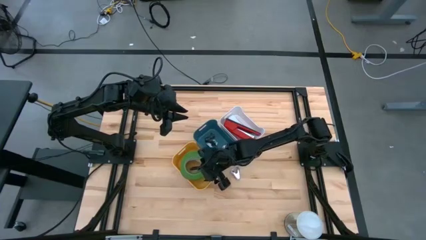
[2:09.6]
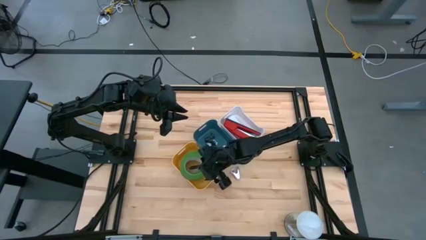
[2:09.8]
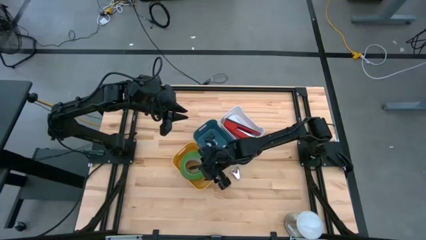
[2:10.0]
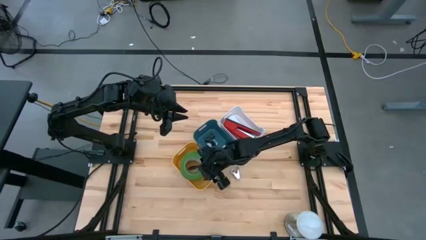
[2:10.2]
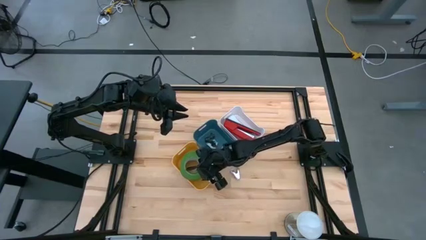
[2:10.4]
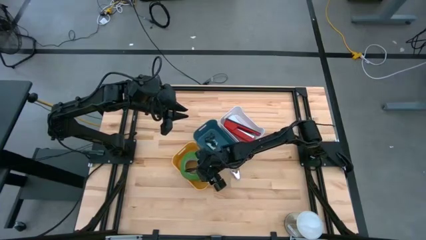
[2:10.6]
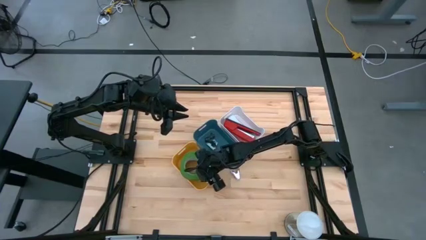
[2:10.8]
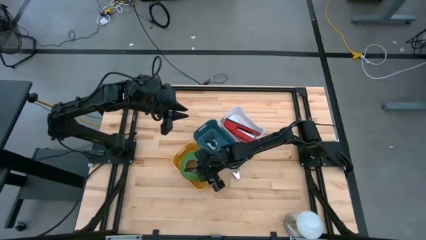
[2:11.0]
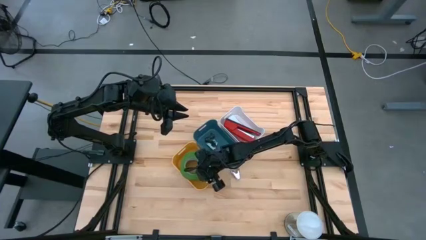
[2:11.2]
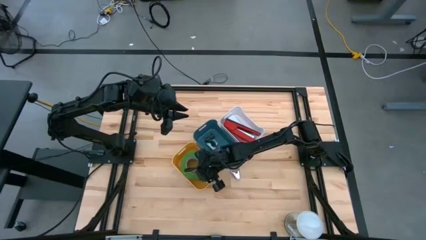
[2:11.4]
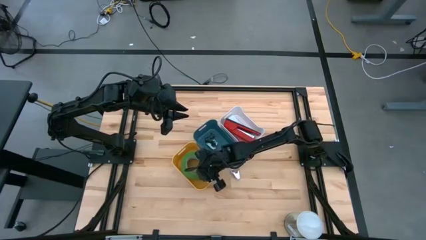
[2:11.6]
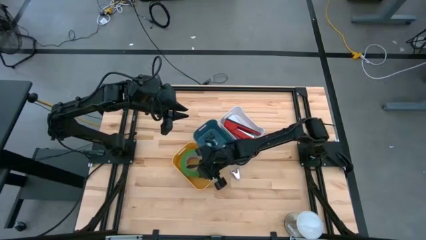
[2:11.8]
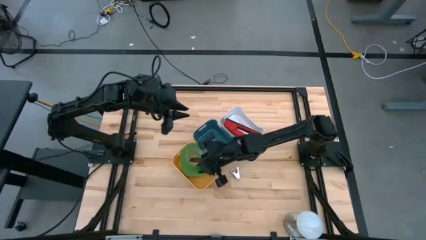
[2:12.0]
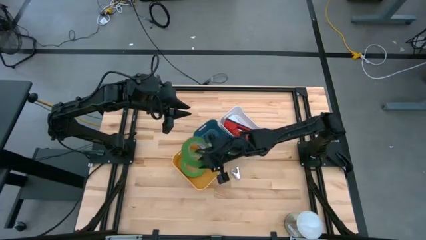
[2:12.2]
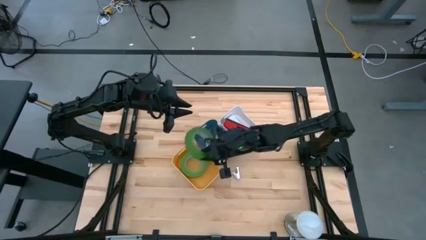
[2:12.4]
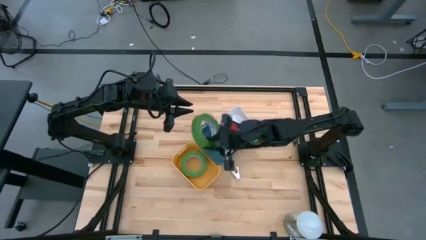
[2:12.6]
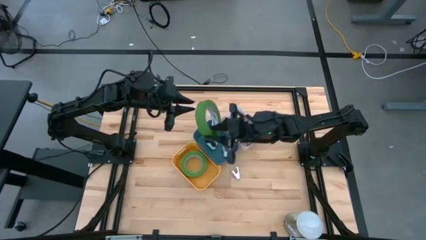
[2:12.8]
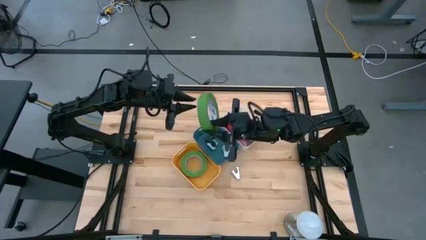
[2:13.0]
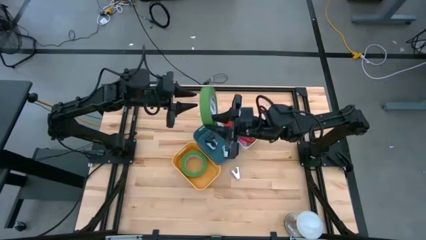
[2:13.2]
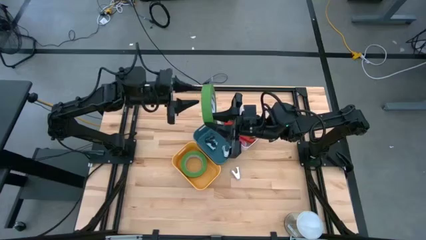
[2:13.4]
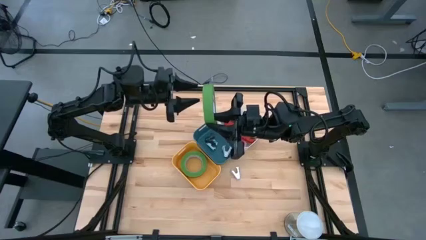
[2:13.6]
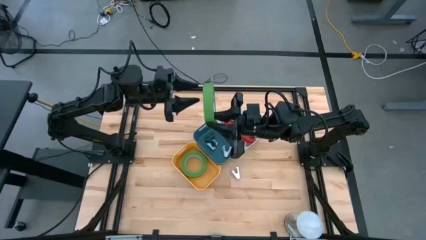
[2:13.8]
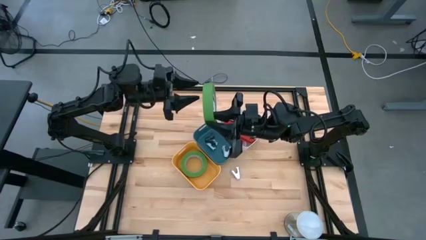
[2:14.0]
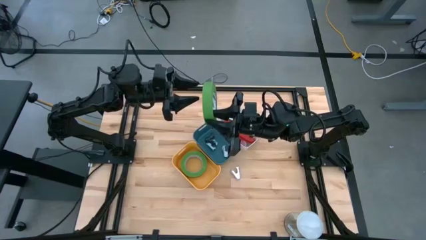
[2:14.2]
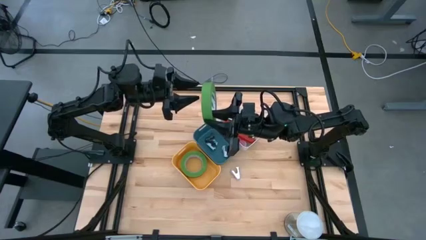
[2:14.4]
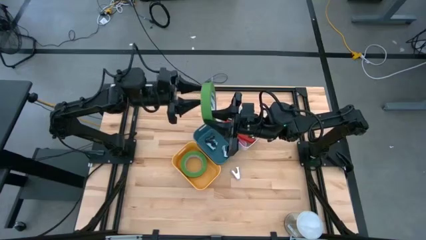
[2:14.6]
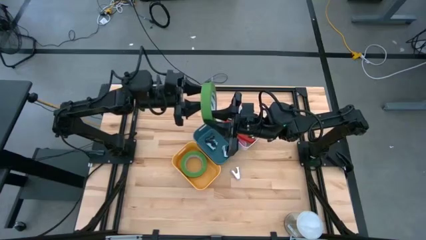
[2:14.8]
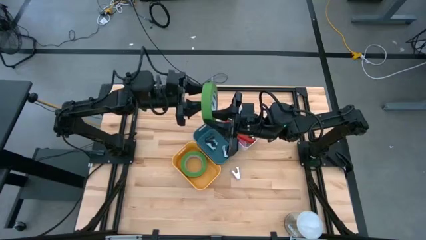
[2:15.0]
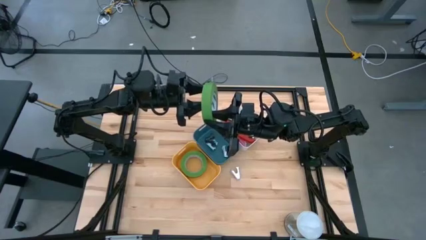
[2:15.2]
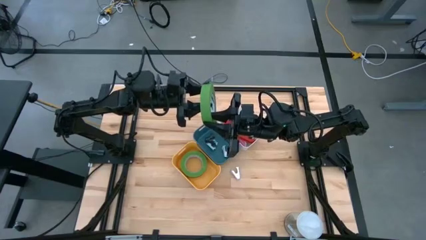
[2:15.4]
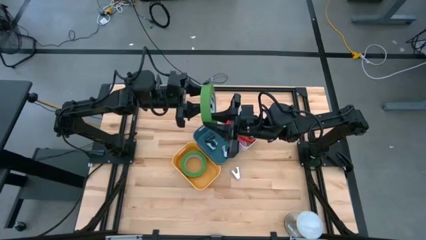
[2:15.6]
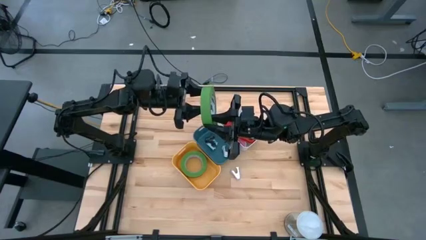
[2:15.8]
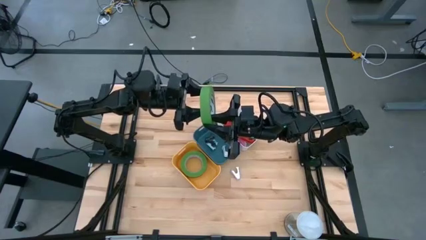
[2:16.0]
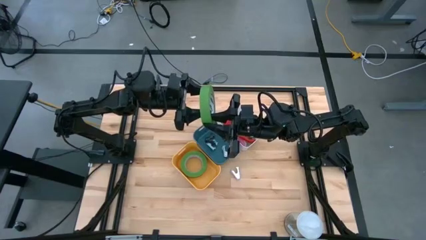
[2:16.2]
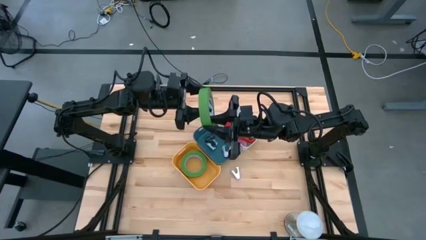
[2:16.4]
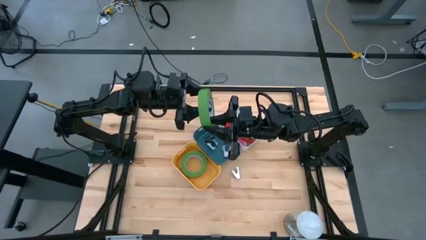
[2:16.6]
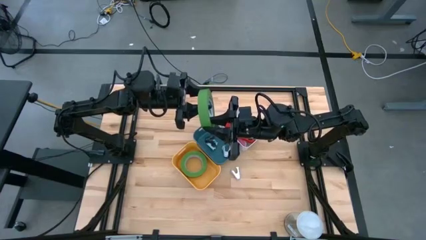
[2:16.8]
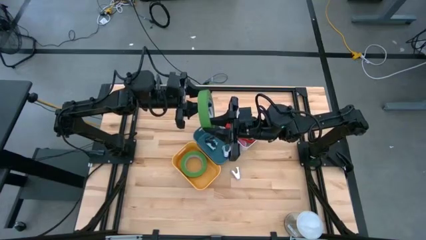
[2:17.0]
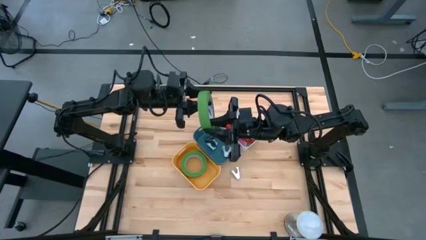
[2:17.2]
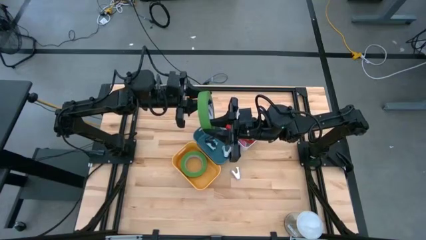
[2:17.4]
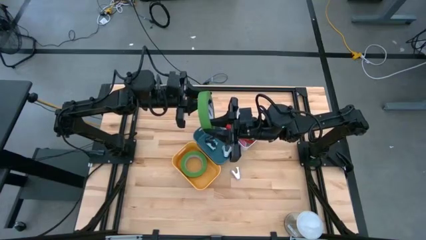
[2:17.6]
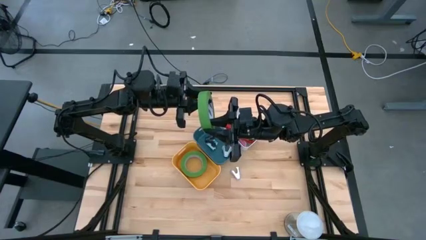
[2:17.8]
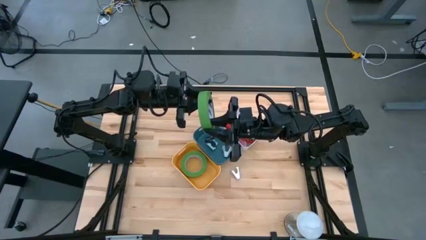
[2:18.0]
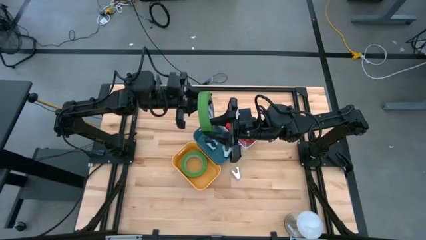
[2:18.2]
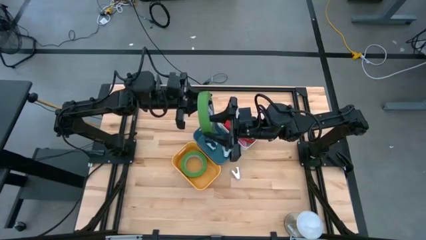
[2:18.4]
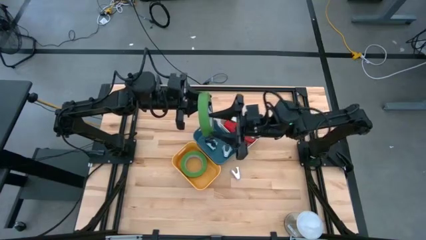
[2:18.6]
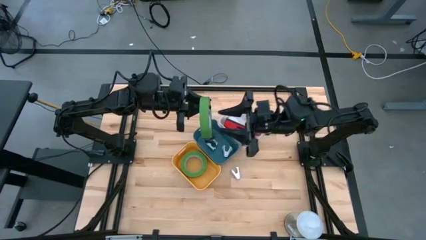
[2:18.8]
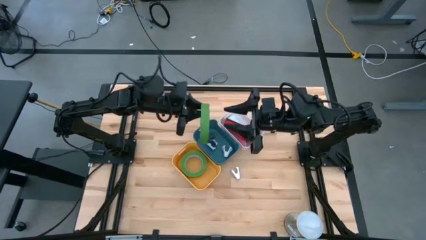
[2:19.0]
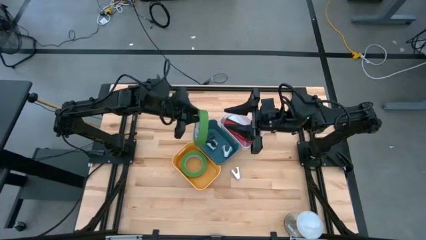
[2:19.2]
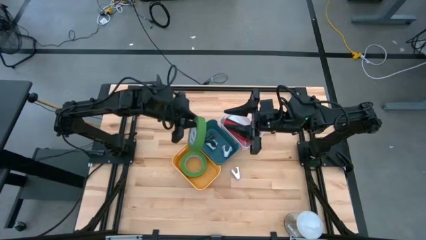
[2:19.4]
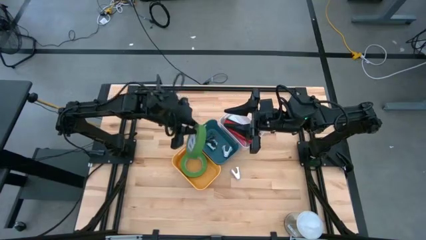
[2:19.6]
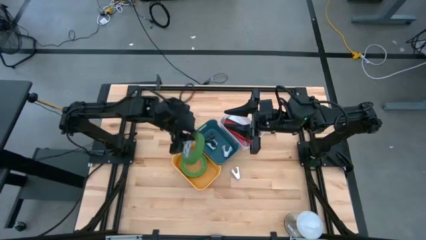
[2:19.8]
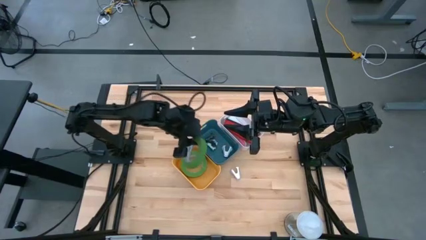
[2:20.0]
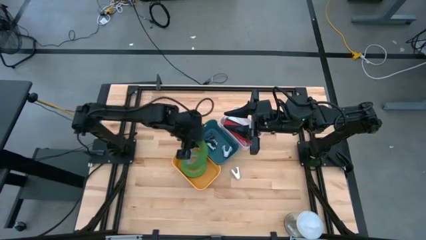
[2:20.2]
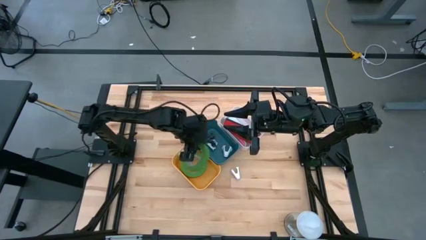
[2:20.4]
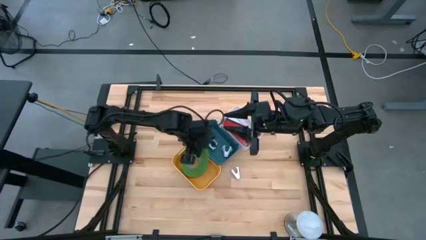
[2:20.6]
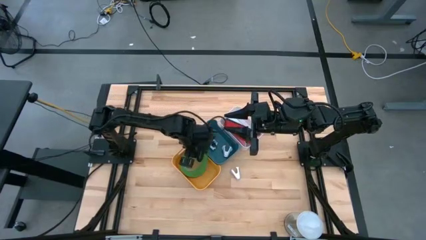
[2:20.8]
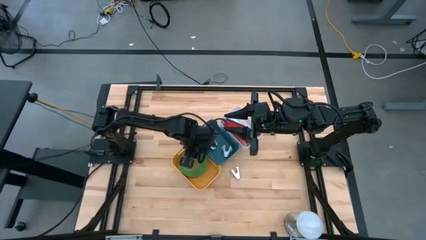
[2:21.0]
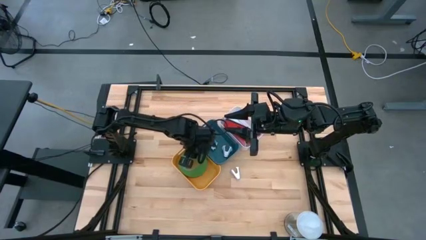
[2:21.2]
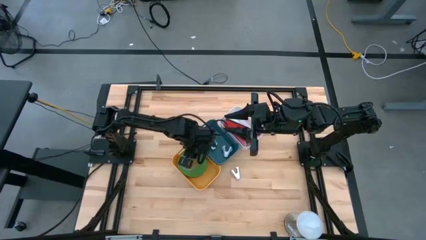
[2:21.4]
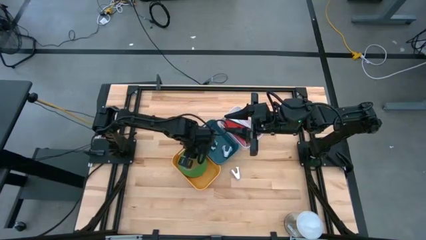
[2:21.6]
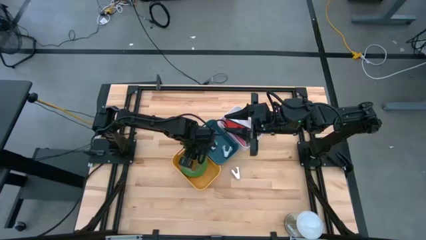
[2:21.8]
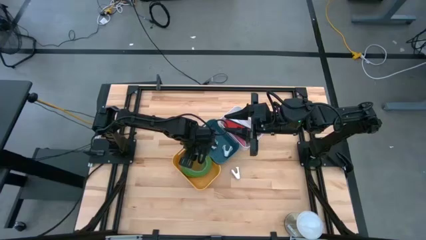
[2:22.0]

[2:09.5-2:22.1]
Task: Pick and place Stapler, Stapler remover, tape
Put the green tape into the yellow bin

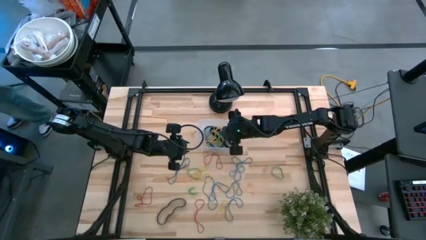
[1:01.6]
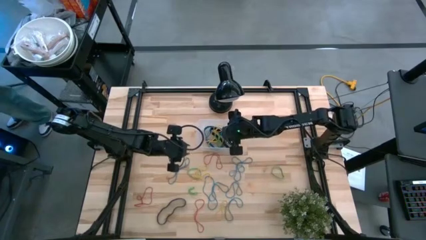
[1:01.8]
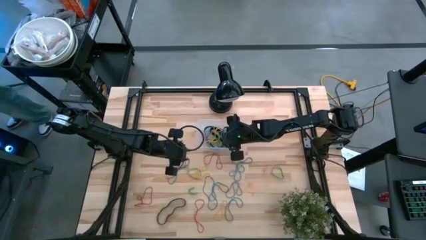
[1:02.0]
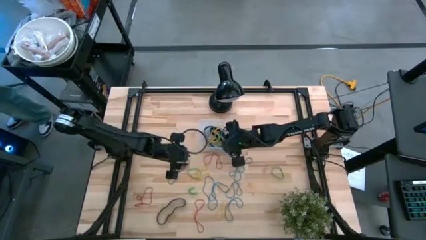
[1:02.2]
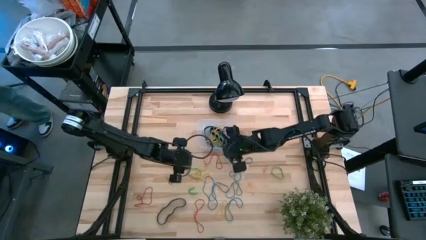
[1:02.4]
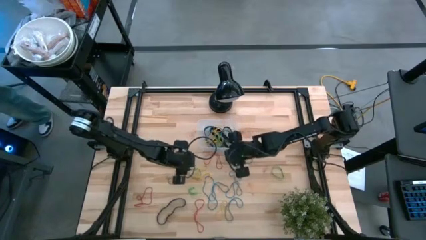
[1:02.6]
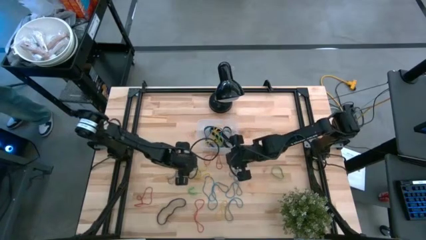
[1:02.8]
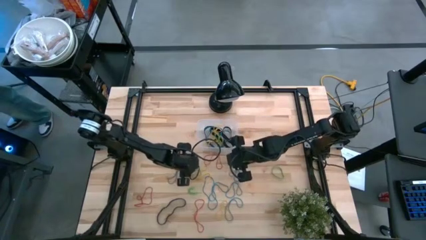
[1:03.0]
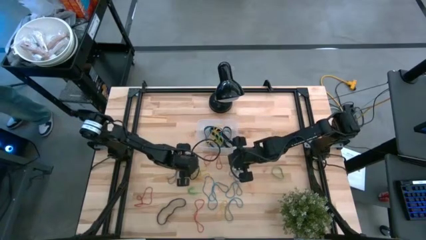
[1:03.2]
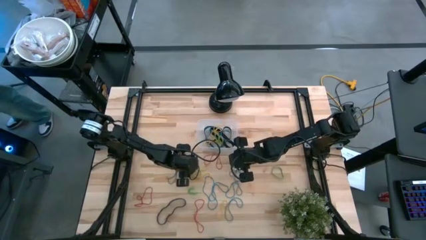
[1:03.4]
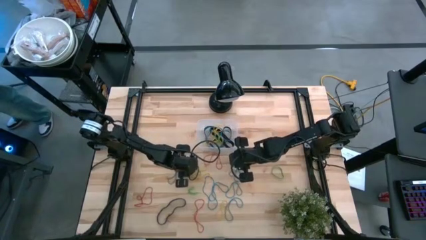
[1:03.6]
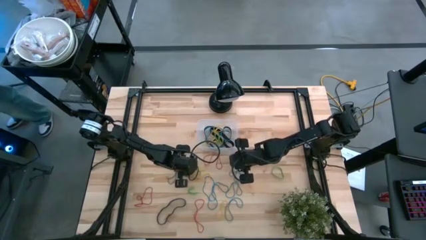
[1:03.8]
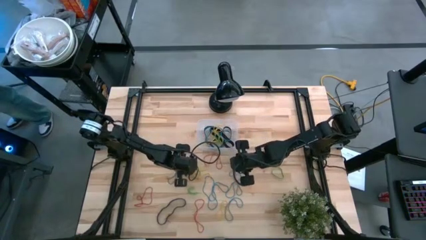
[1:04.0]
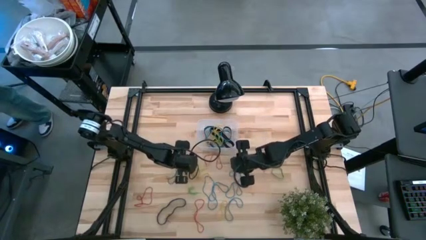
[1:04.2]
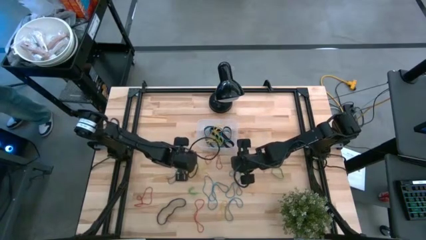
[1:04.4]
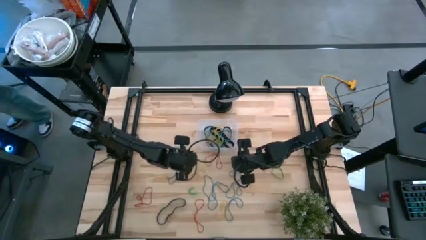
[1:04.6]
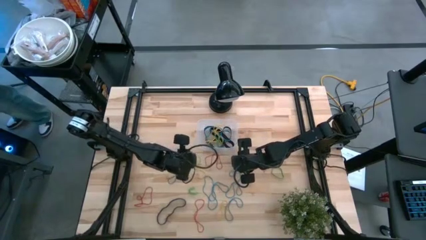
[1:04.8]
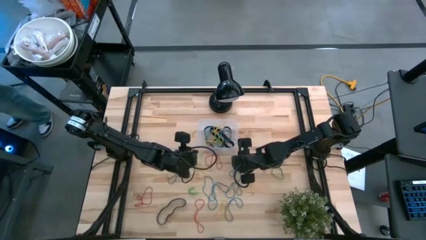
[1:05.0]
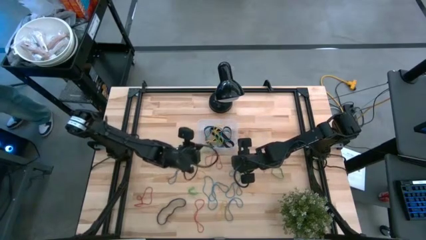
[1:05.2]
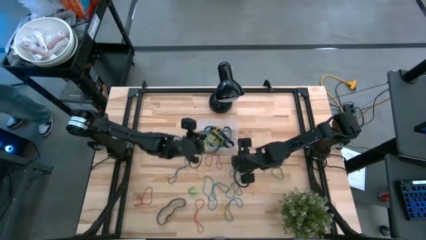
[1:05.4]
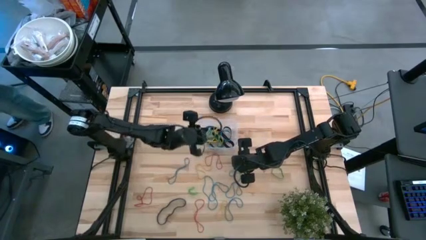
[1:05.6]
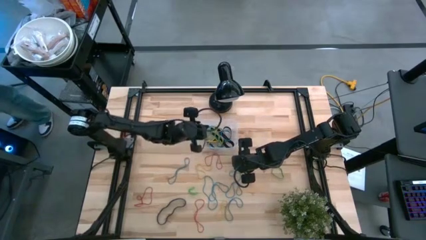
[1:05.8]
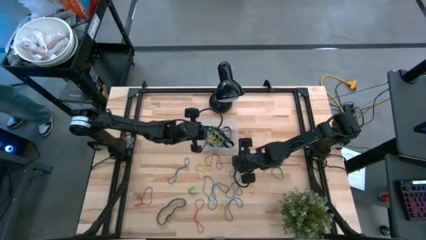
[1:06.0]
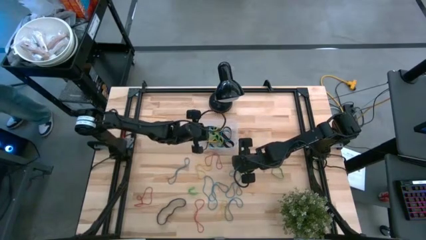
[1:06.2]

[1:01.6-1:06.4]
Task: Pick and place rubber bands into bin
Put the green rubber band into the transparent bin
